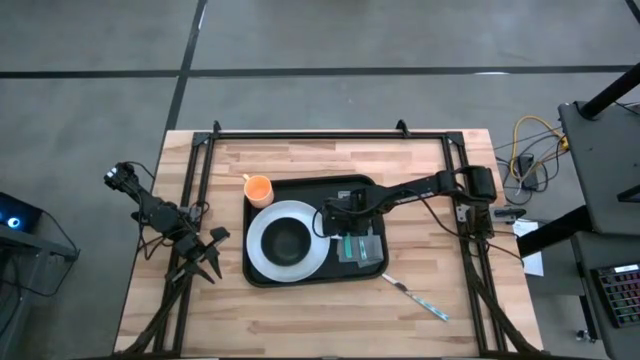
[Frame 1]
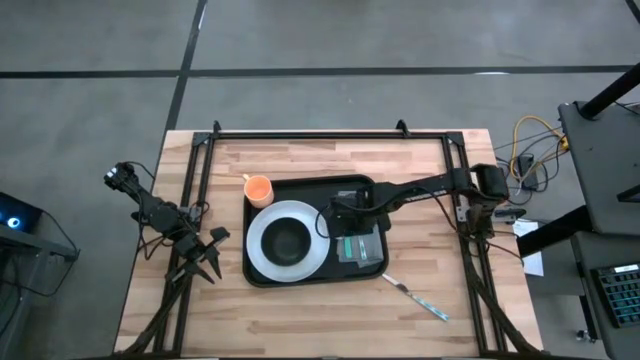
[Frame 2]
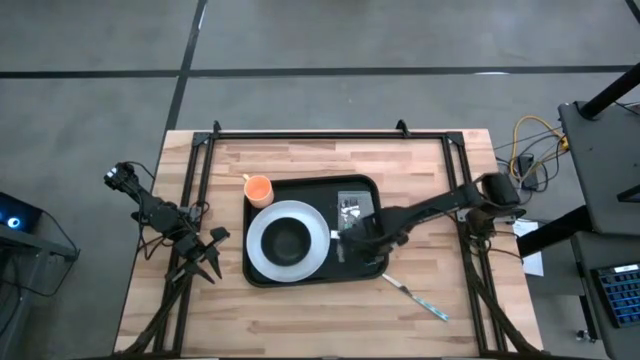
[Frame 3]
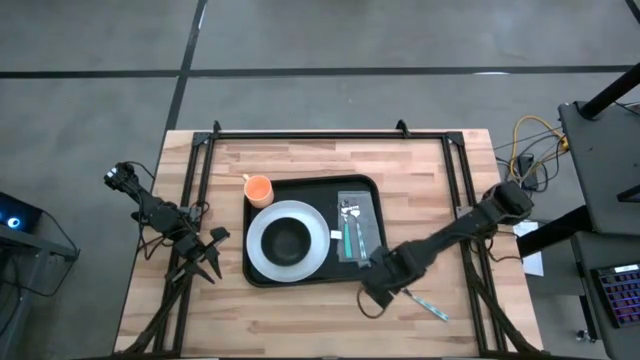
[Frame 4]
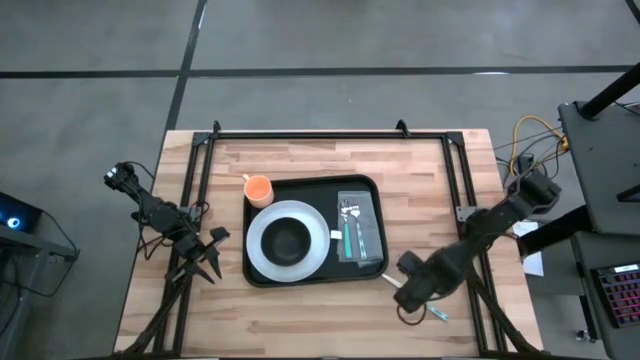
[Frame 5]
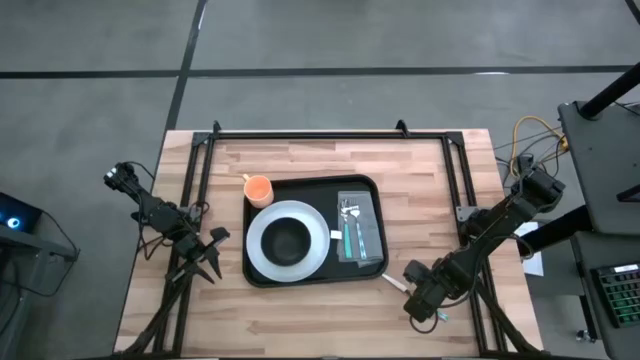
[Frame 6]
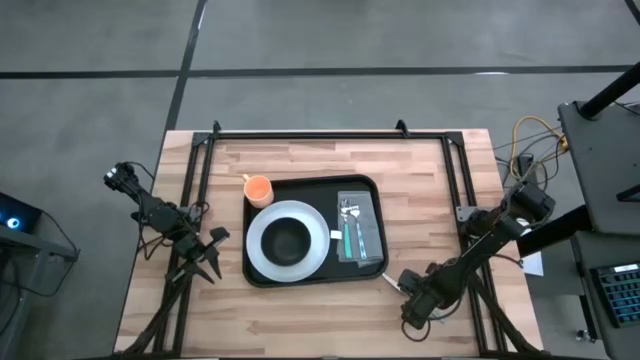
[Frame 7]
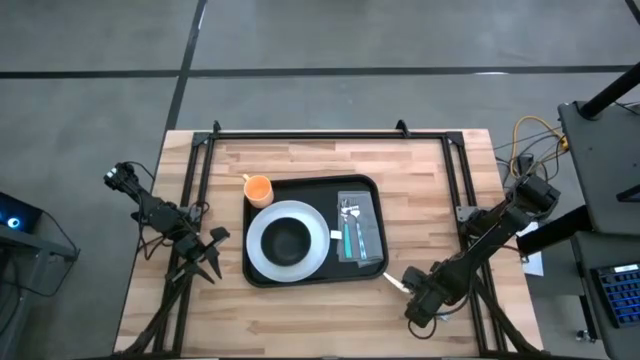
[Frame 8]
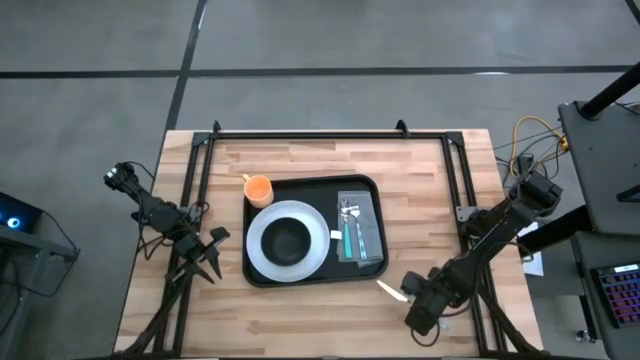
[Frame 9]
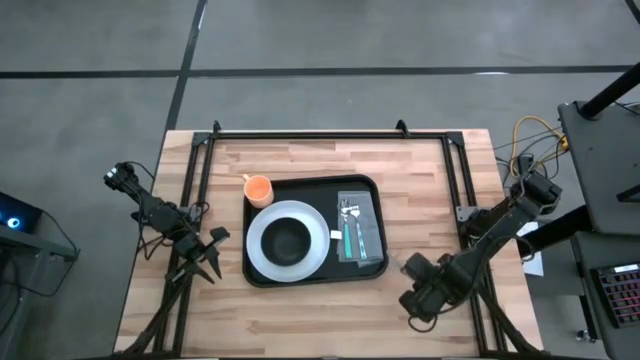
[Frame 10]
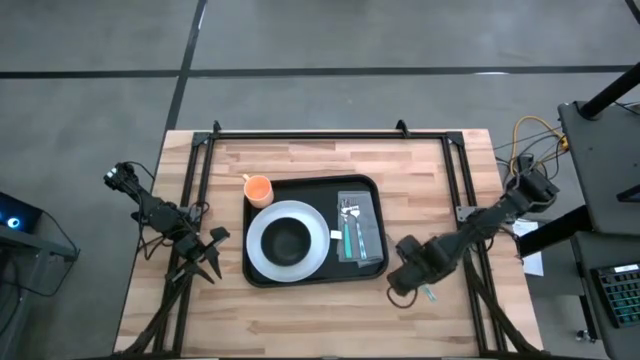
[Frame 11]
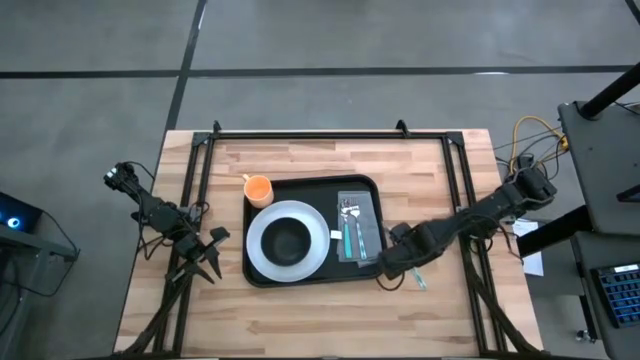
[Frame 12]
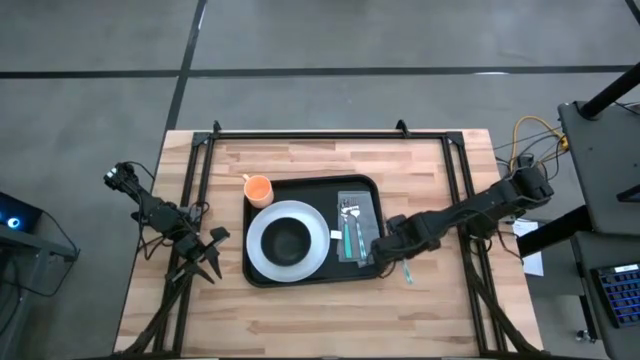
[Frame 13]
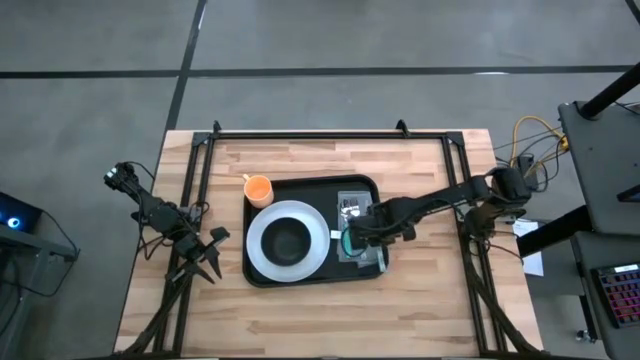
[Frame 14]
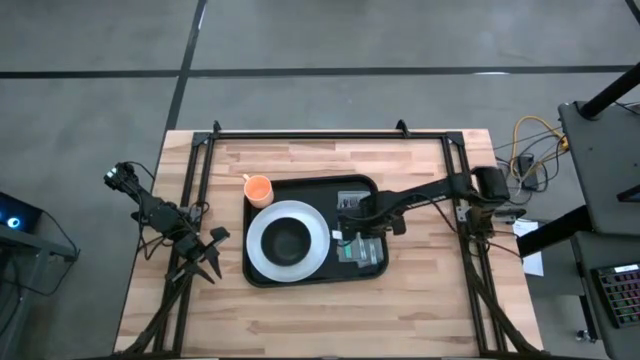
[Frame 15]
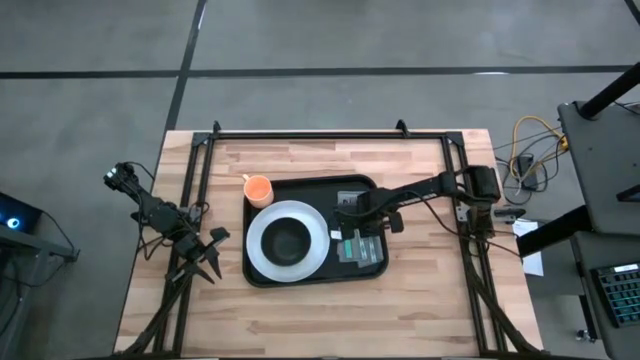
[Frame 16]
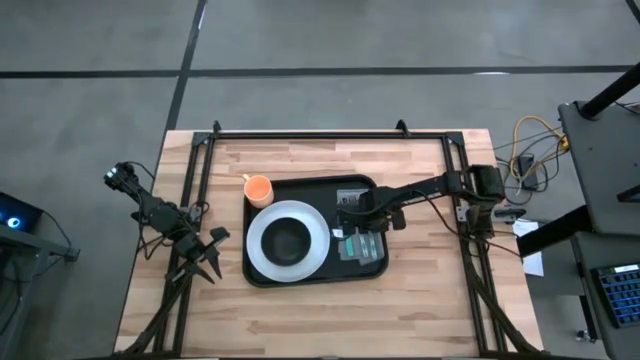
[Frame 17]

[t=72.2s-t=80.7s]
Task: Set up tray
Put the blue knife to the right of the blue fork on the gray table napkin on the black serving tray

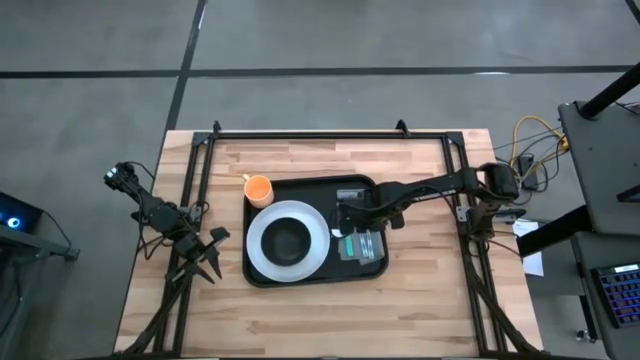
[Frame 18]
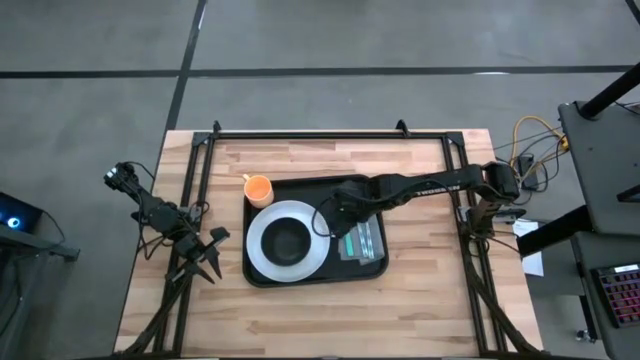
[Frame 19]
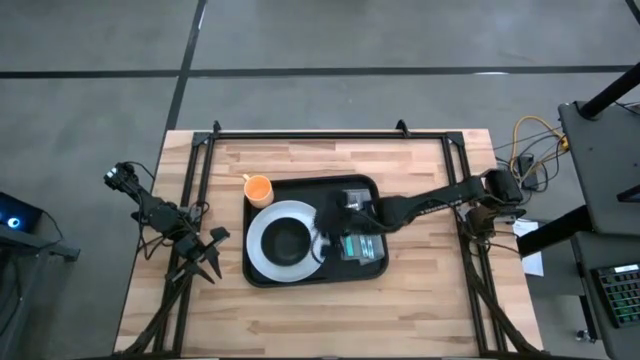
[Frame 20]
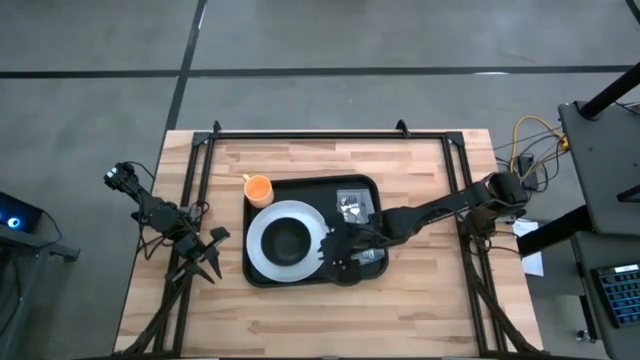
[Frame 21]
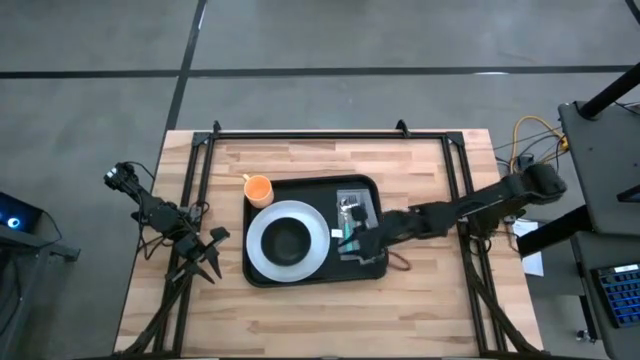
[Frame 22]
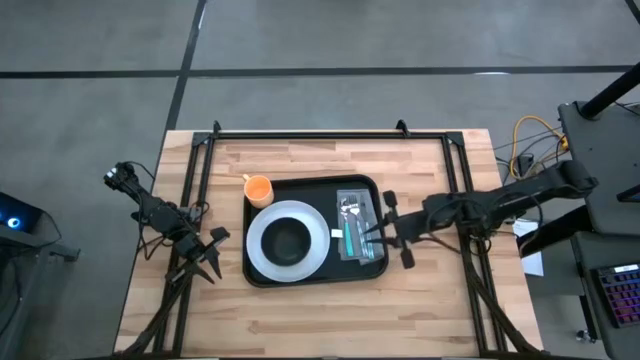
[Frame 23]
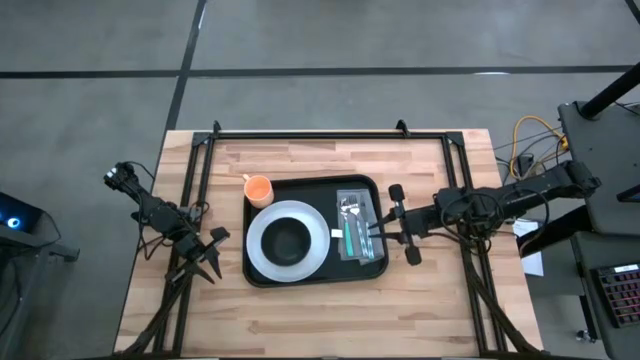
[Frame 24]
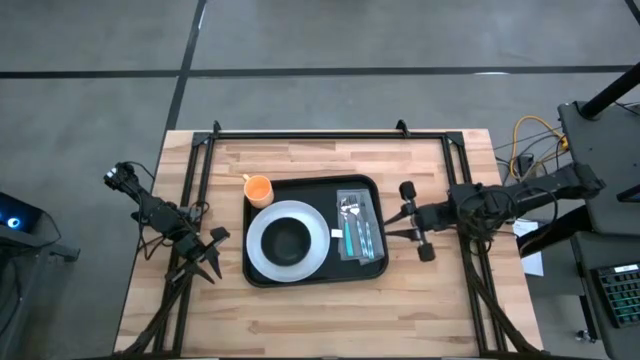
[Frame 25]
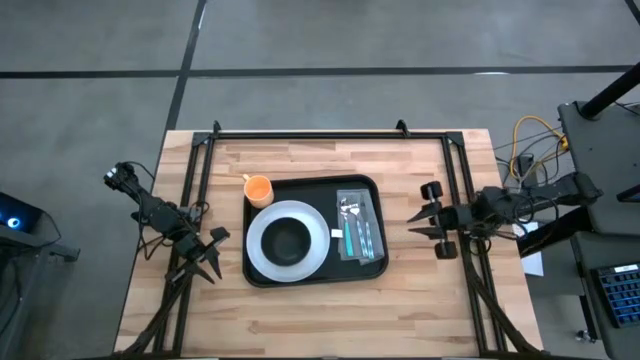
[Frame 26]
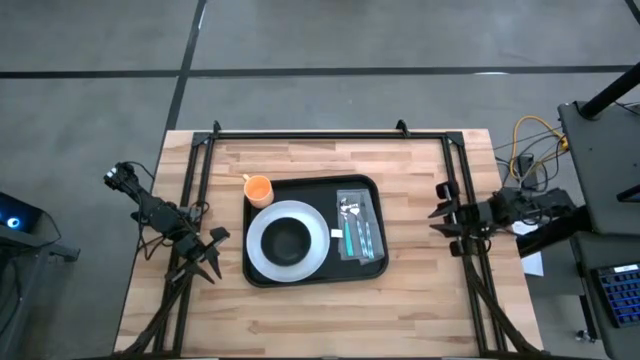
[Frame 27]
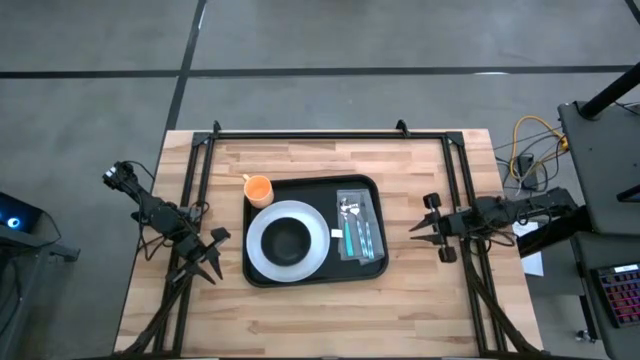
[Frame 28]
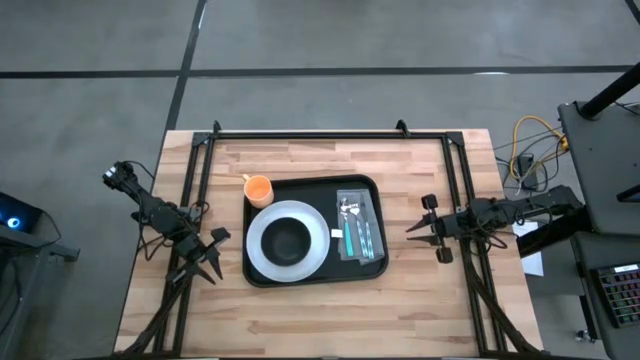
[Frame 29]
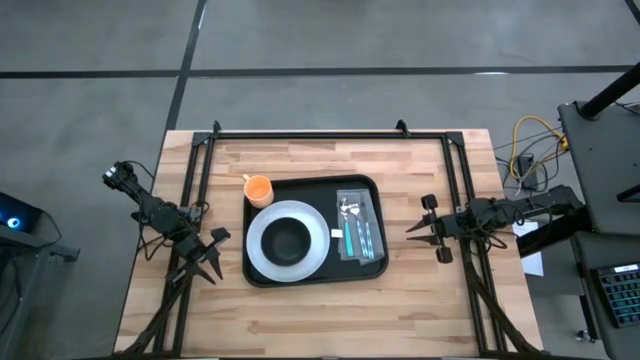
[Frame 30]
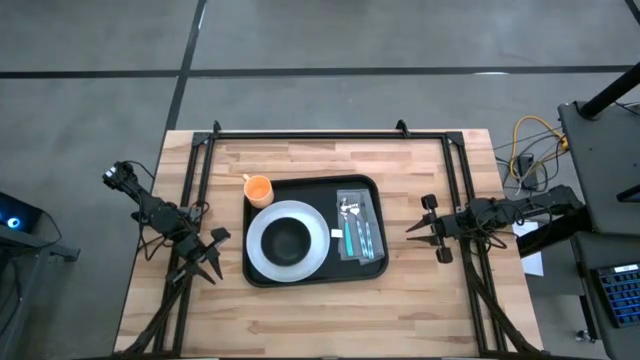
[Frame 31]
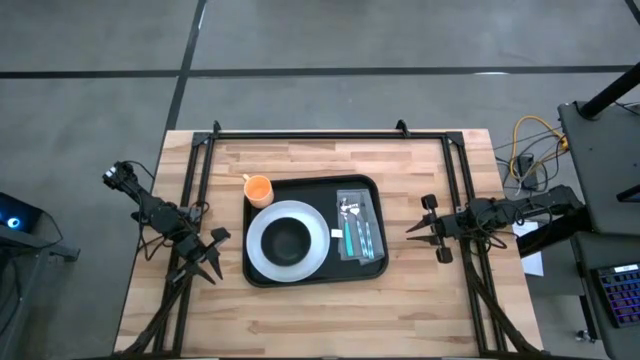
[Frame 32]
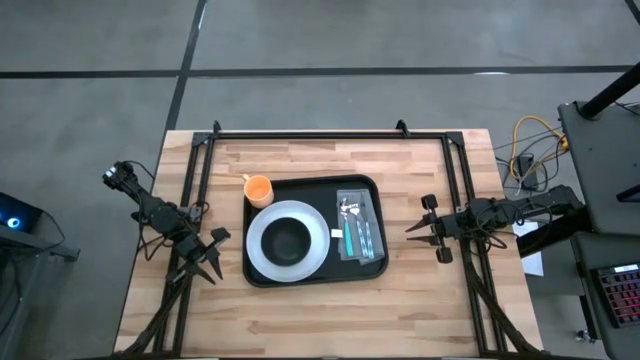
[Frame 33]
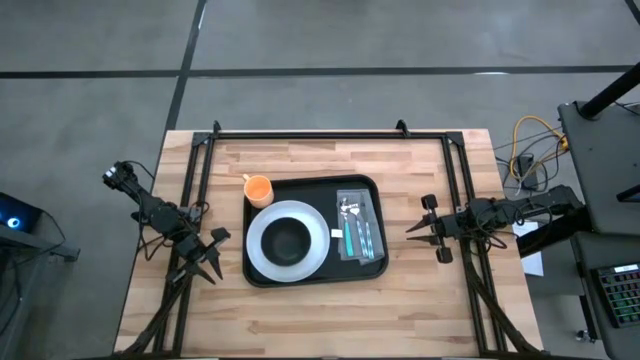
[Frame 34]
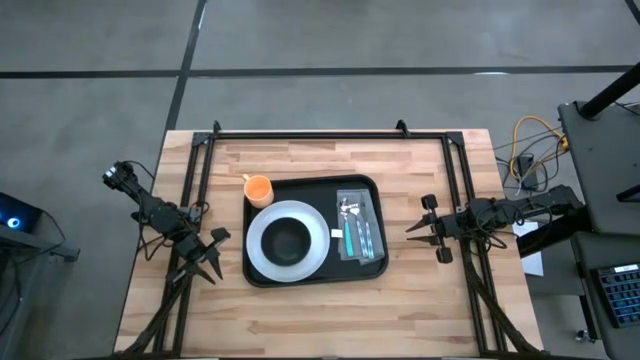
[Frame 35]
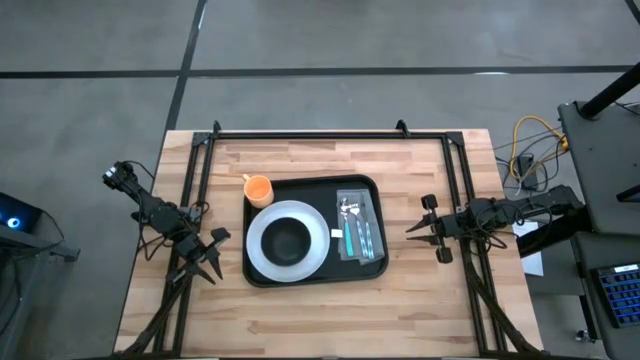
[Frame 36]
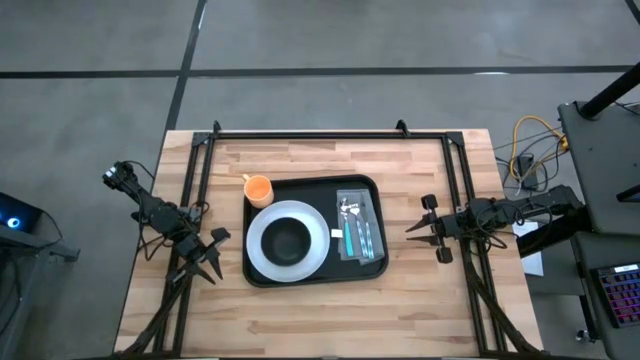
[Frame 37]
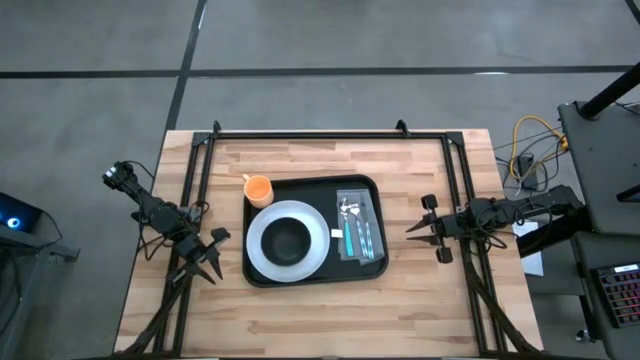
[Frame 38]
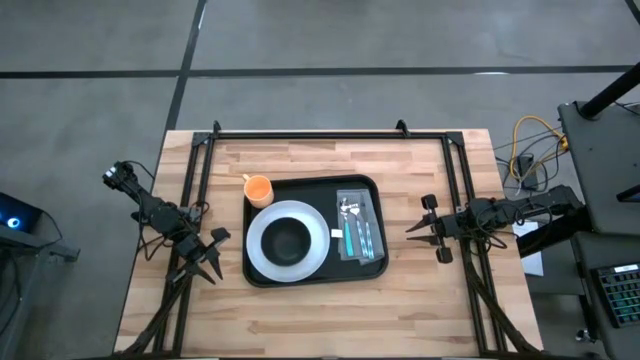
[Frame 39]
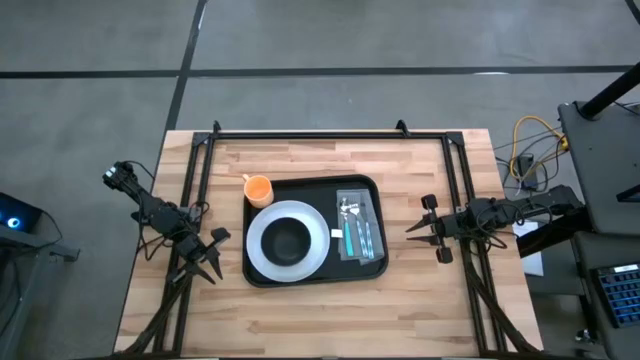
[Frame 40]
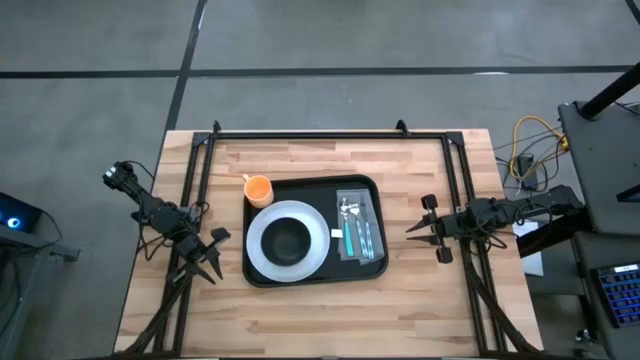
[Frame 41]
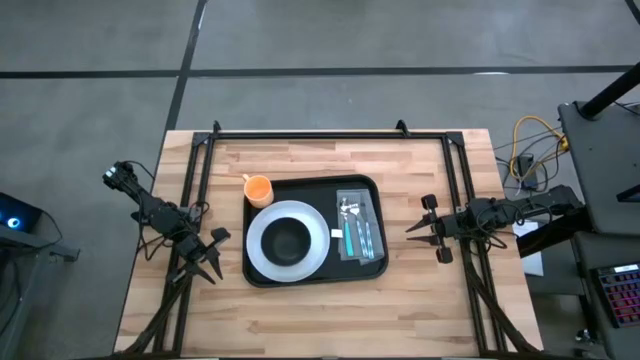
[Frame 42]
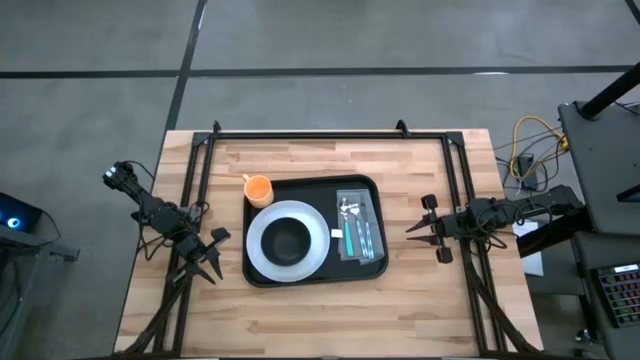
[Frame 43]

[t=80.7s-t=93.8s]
Return to Home Position
